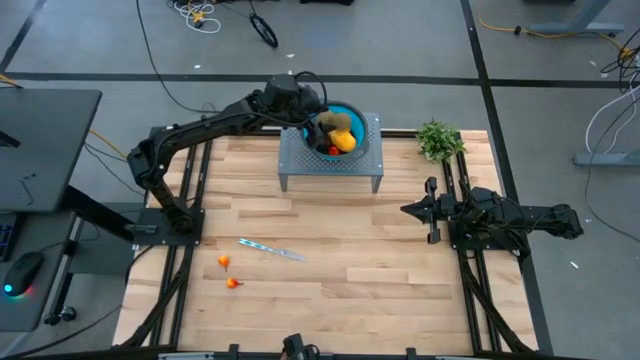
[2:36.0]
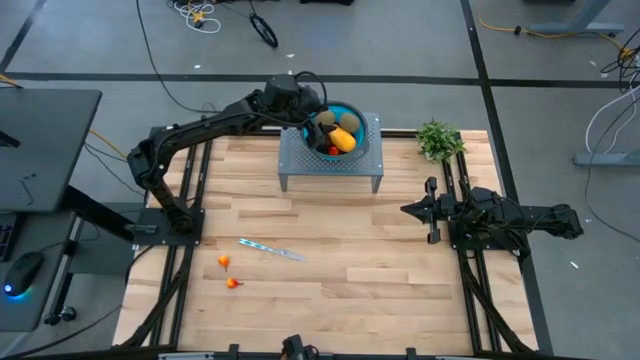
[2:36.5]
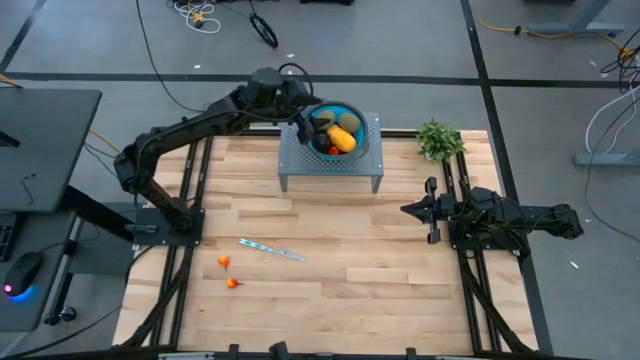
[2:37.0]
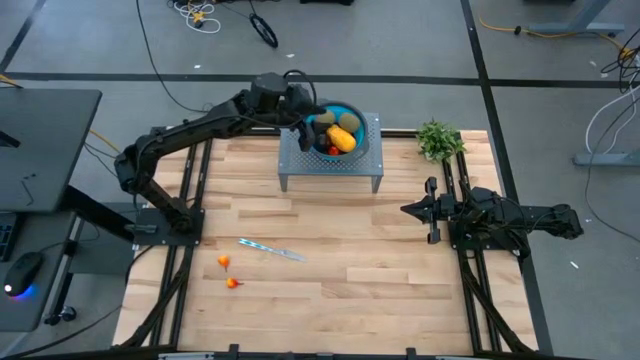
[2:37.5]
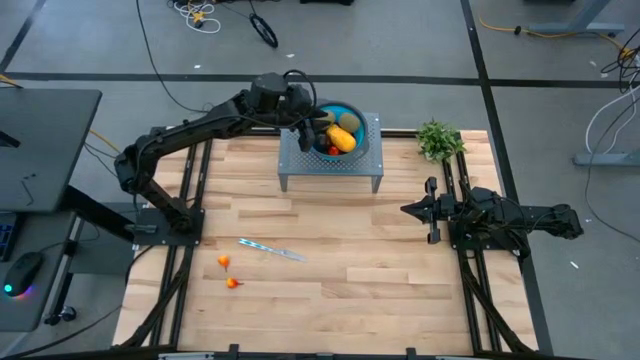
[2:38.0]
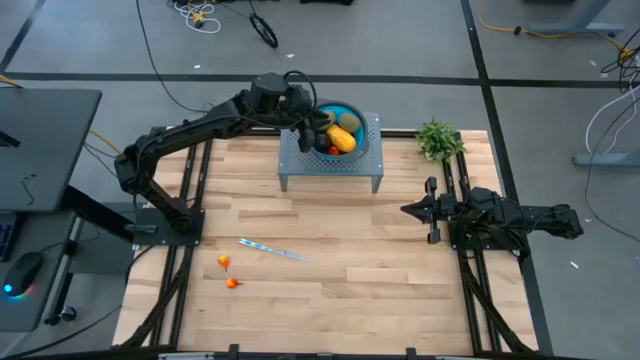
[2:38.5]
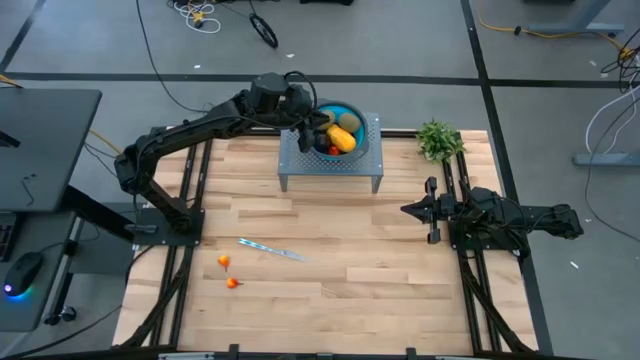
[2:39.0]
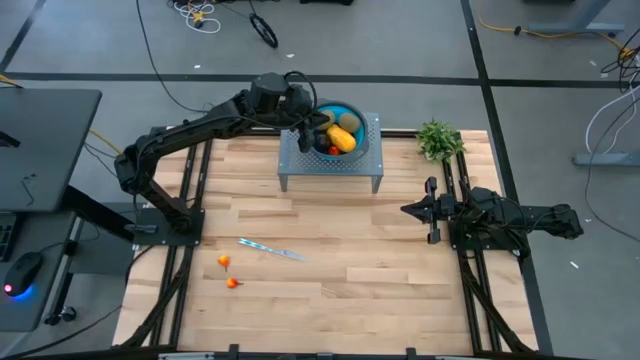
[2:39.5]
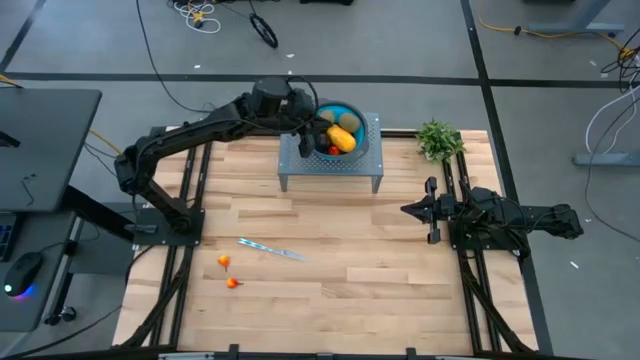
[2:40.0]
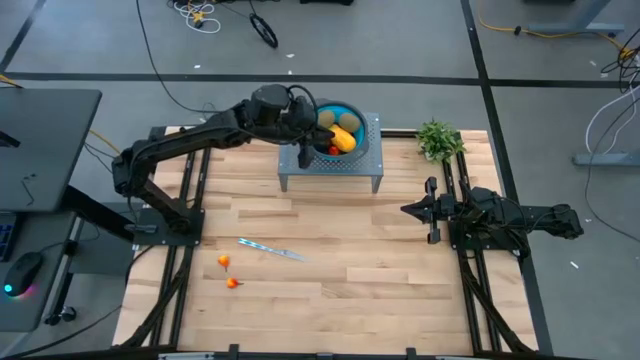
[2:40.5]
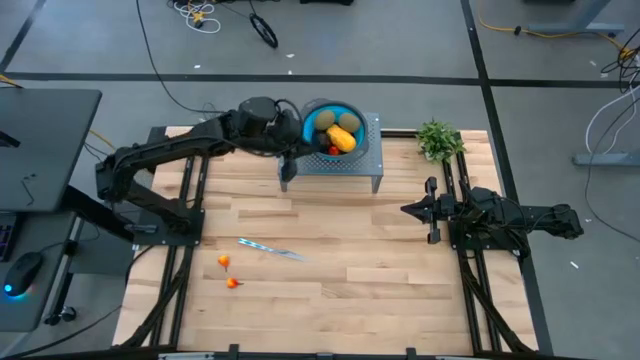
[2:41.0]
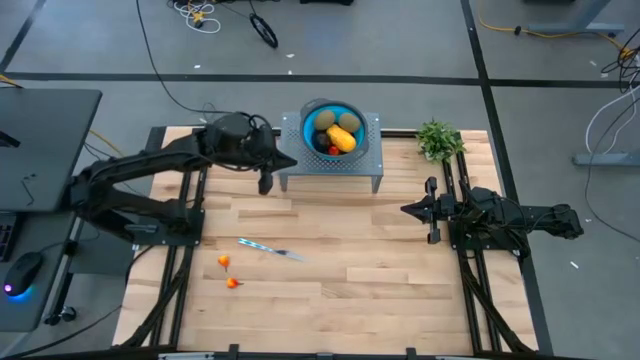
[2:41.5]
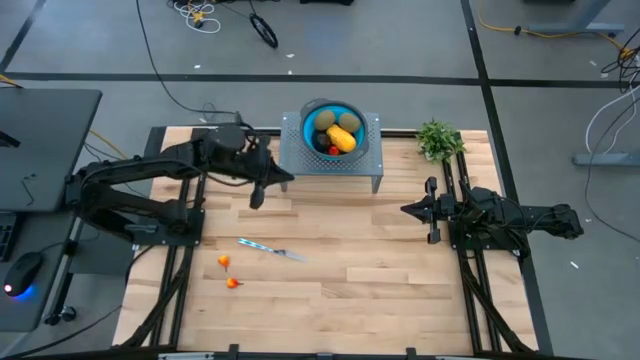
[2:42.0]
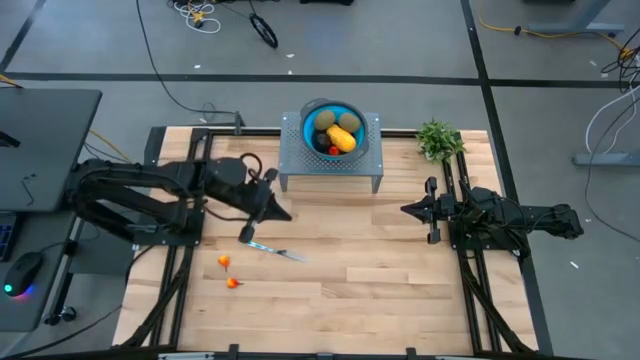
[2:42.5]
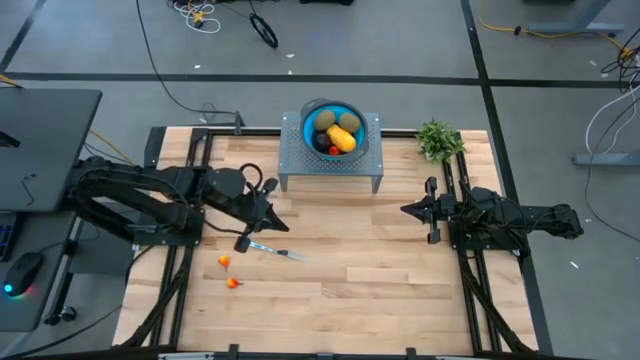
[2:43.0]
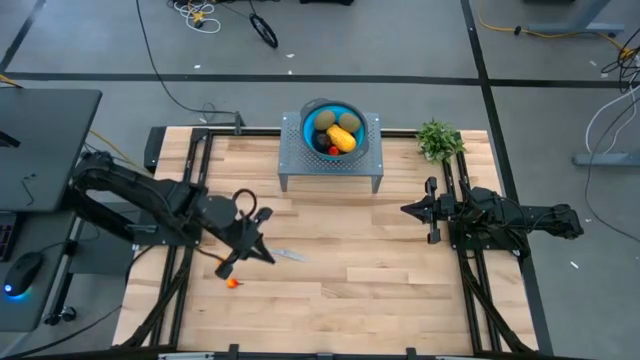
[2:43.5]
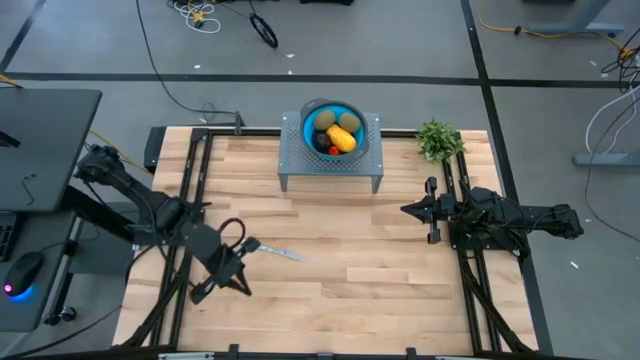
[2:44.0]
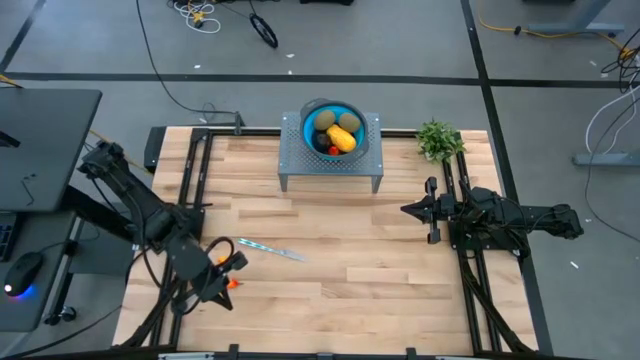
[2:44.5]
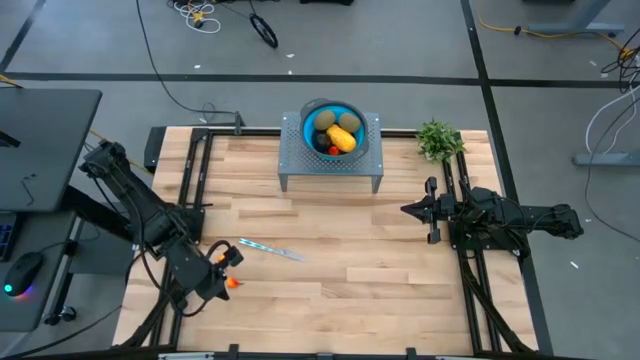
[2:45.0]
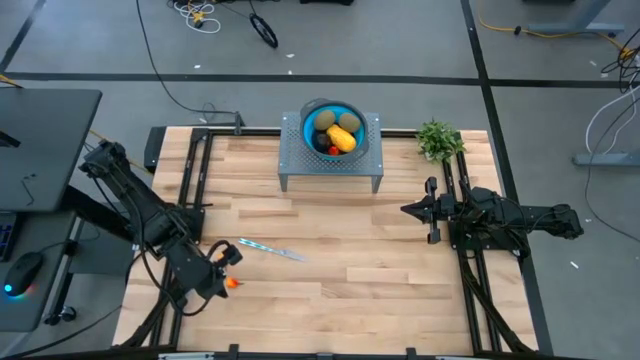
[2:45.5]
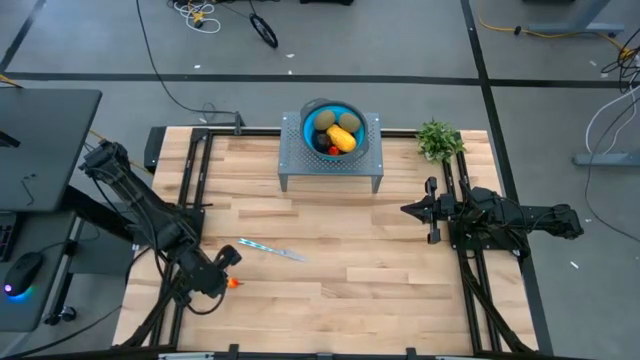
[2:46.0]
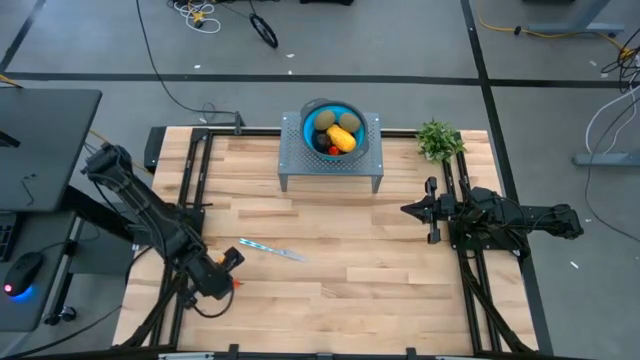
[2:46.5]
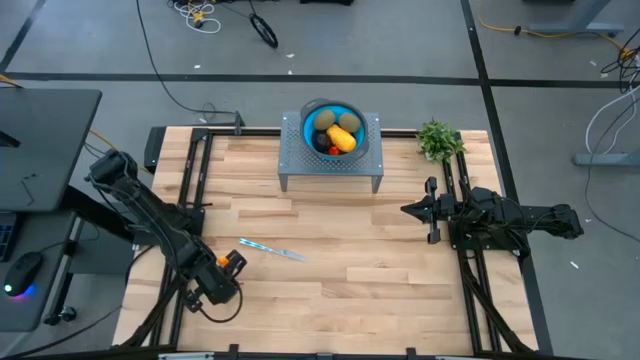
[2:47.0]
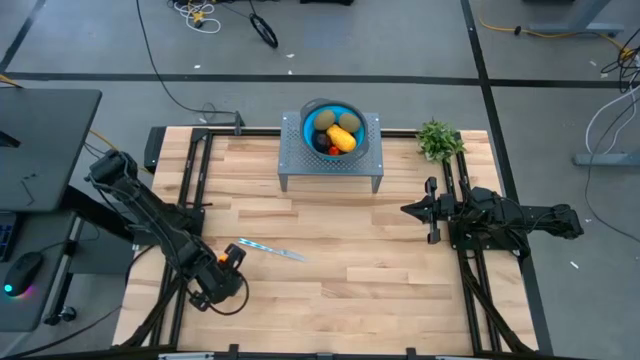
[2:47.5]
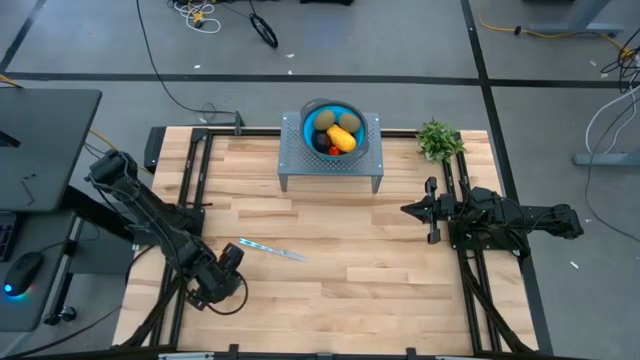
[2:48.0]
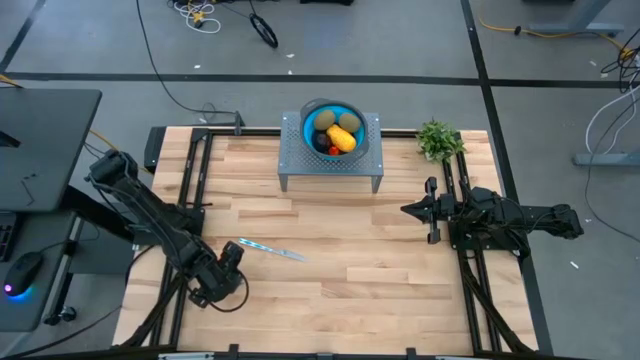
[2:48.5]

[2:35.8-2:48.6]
Task: Pick & Place Fruit
Put the peach into the blue bin

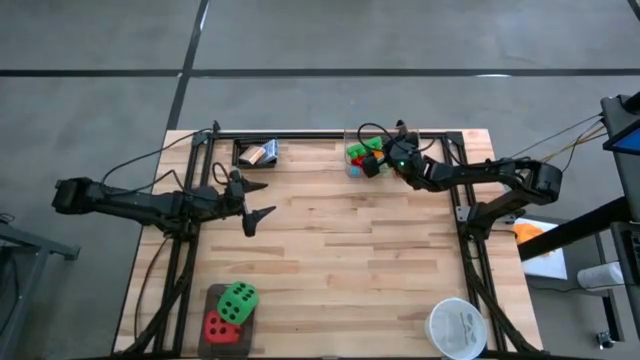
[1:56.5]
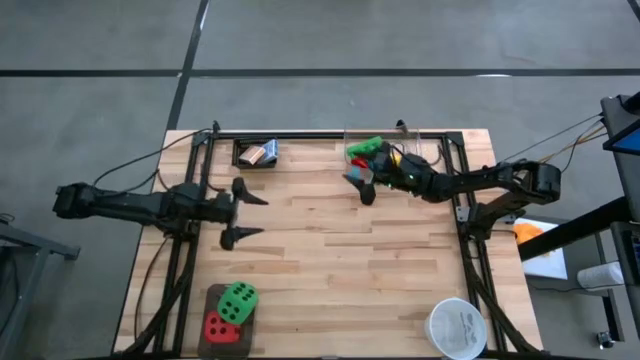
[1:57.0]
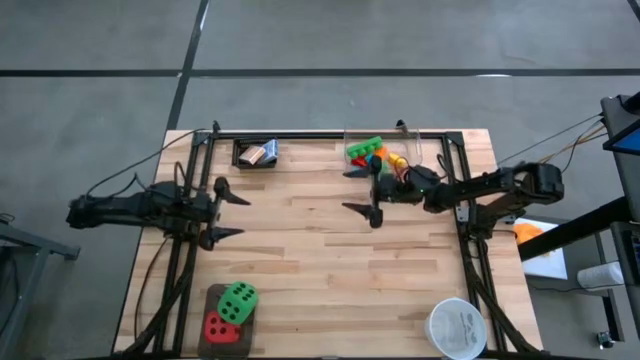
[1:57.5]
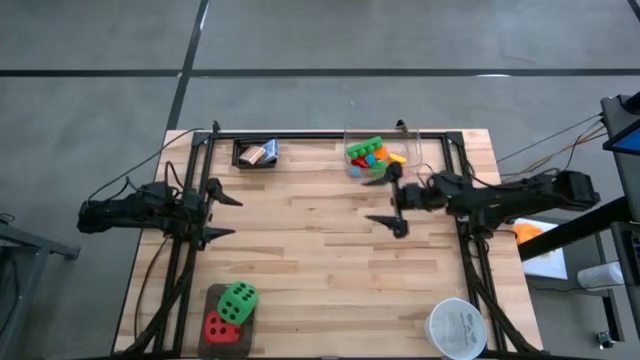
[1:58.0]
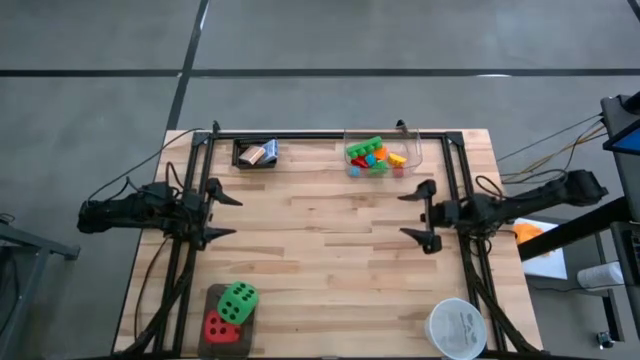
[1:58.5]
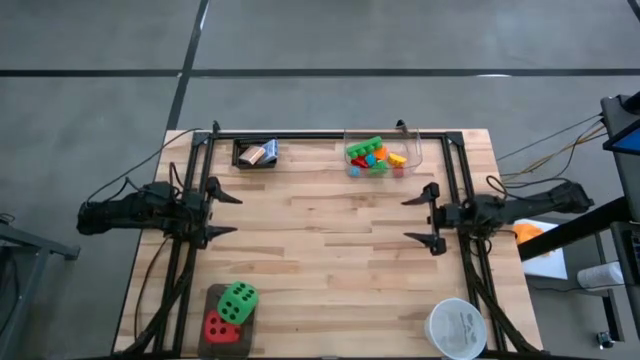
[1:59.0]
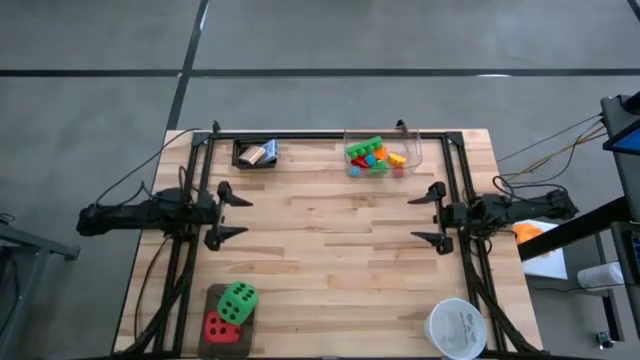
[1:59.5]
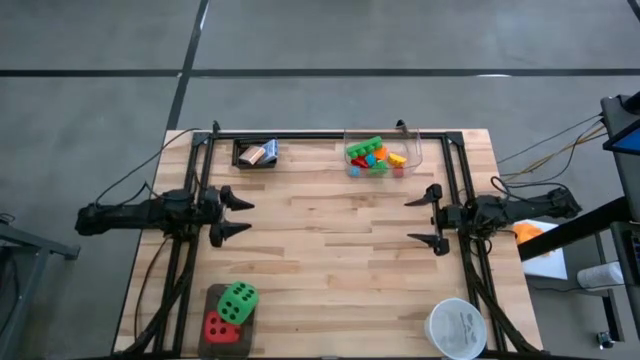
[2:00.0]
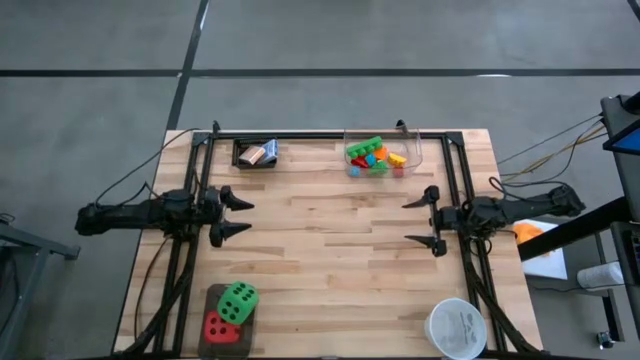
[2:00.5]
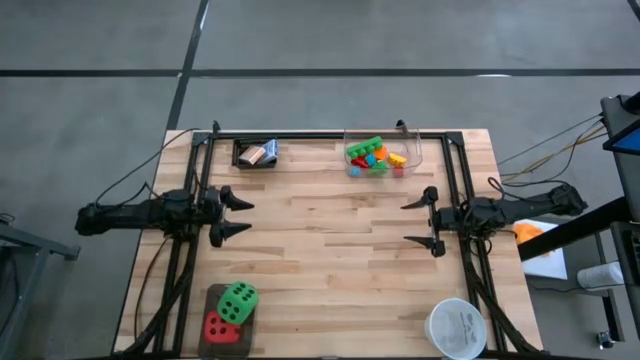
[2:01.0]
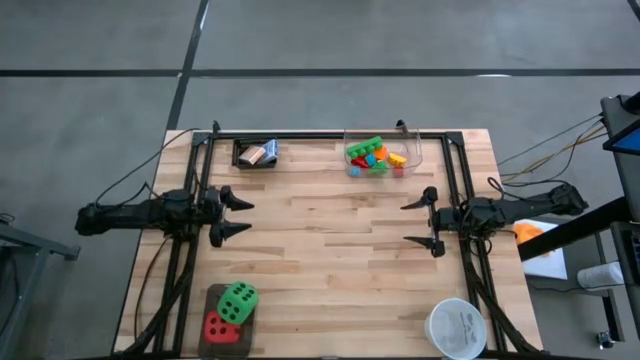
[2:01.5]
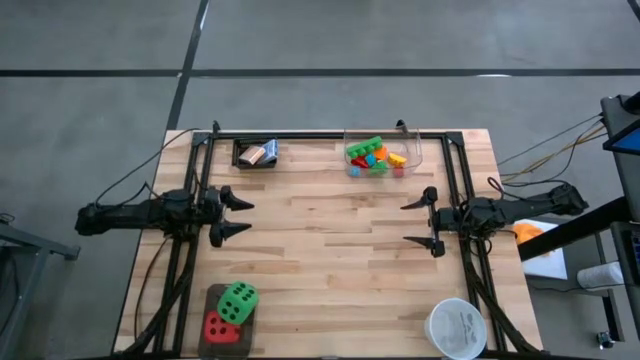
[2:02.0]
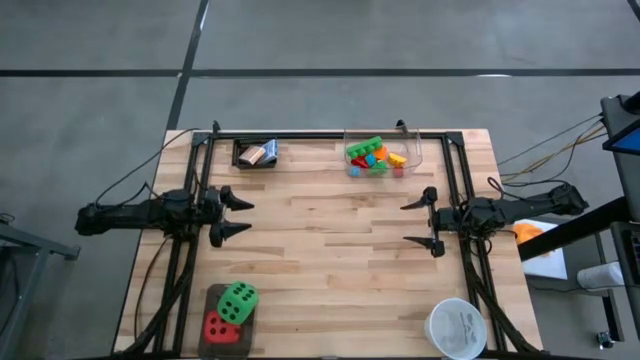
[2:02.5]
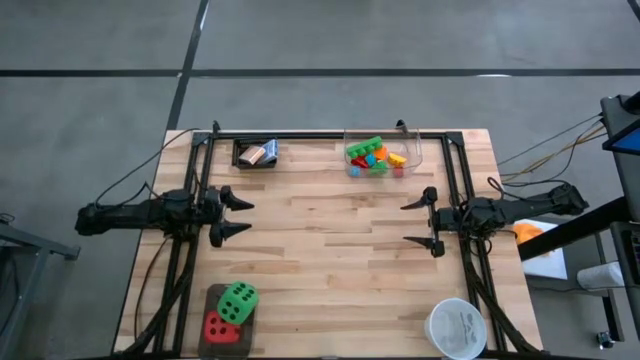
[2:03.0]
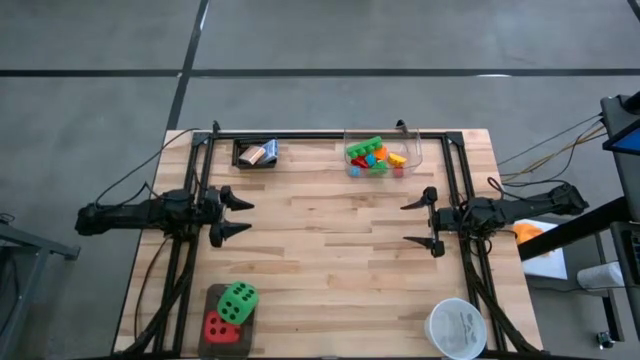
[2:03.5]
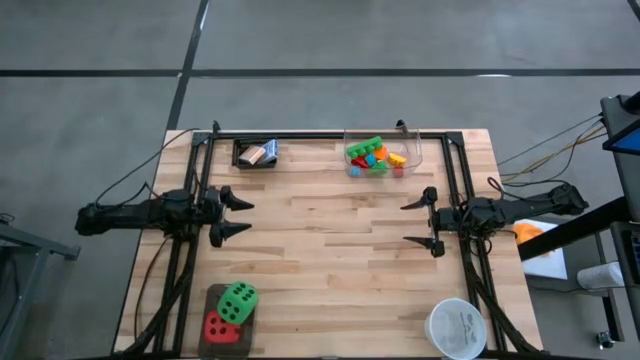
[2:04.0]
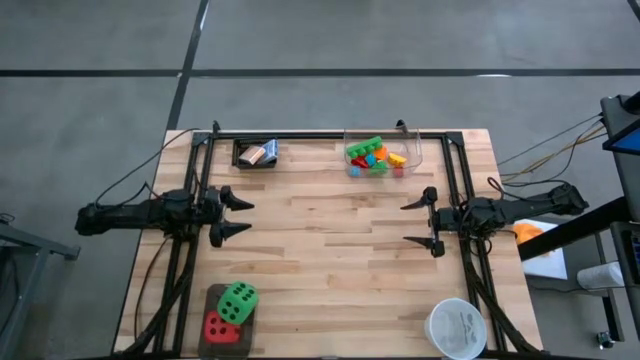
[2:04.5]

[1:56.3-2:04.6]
Task: Pick & Place Toys
Return to Home Position
